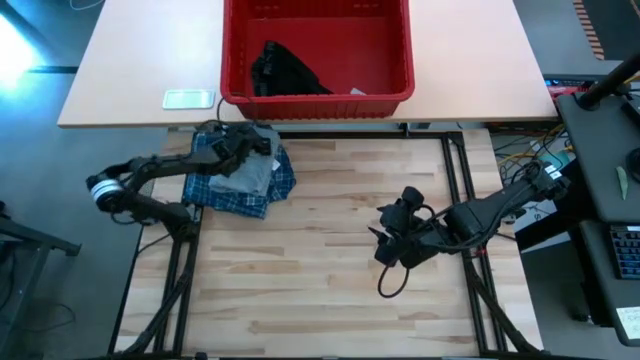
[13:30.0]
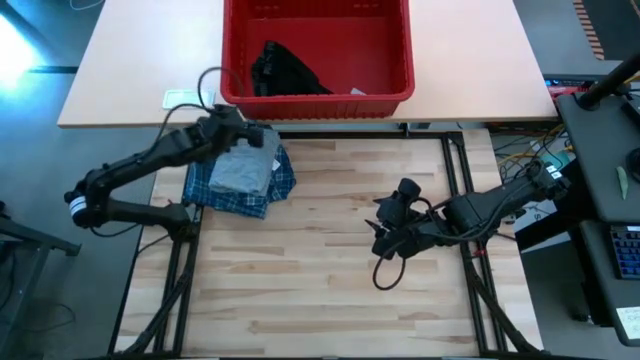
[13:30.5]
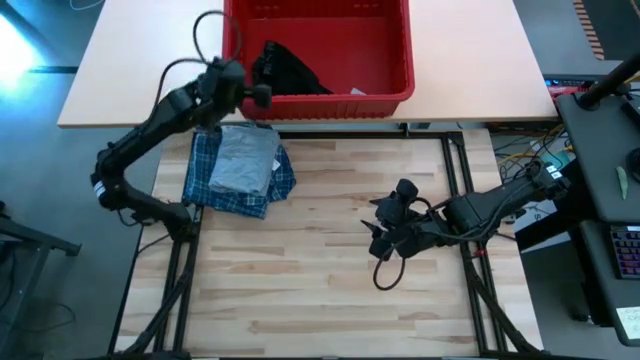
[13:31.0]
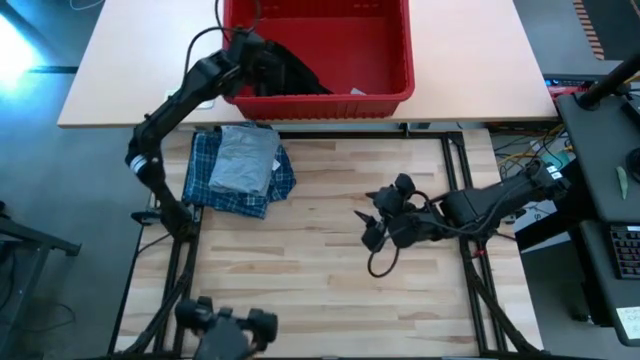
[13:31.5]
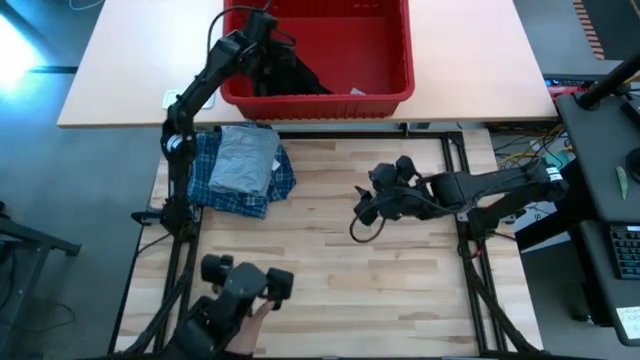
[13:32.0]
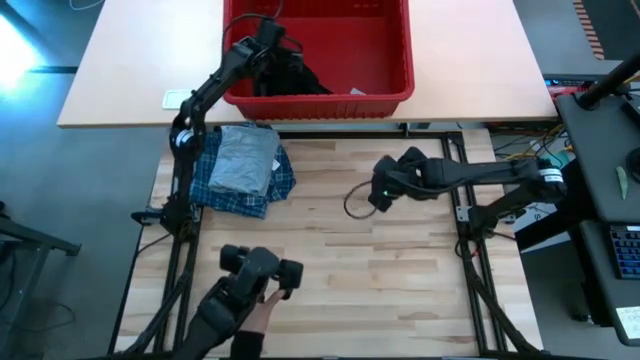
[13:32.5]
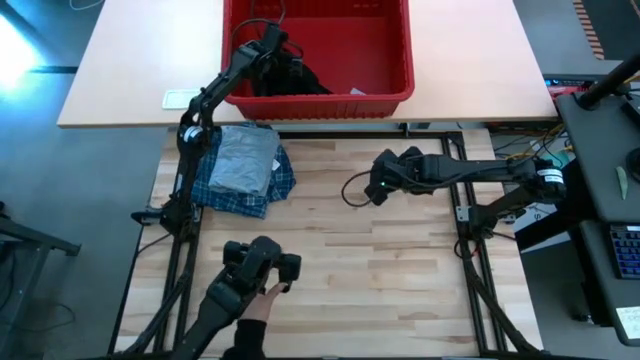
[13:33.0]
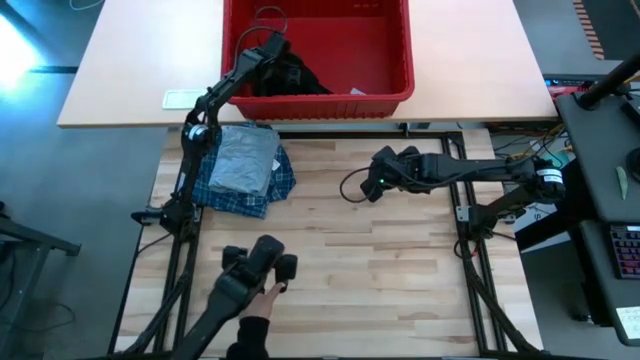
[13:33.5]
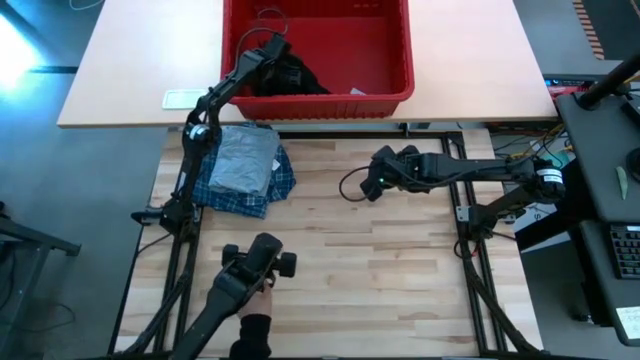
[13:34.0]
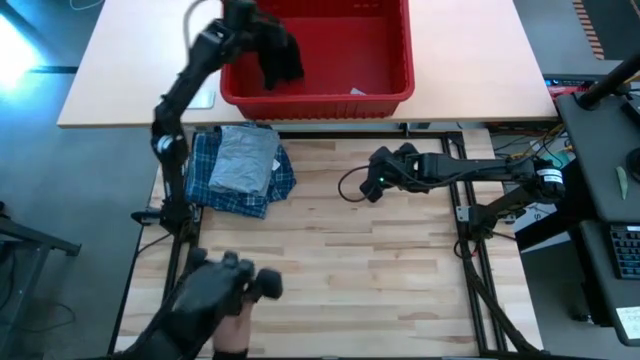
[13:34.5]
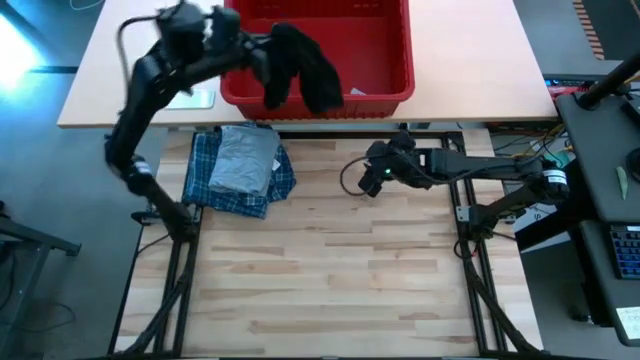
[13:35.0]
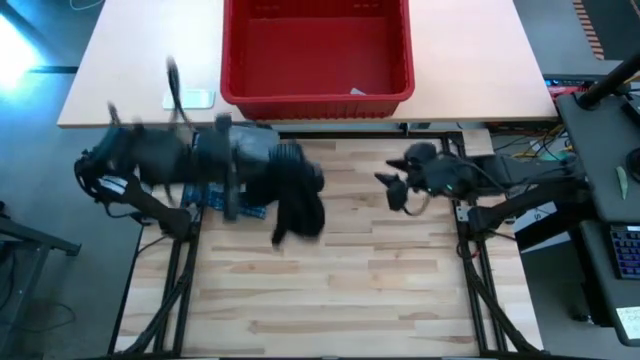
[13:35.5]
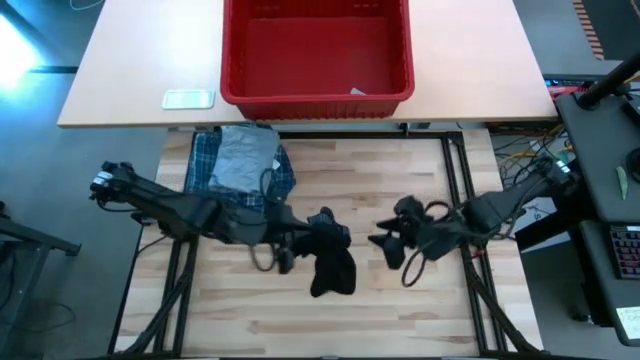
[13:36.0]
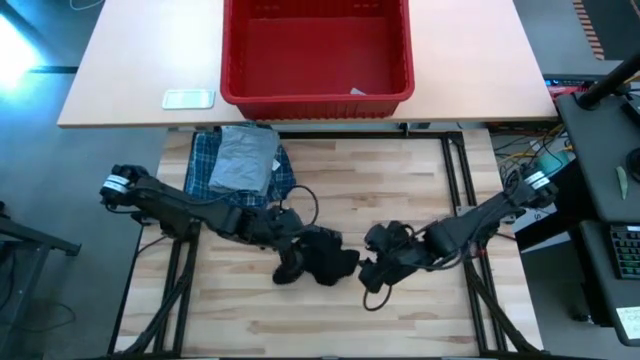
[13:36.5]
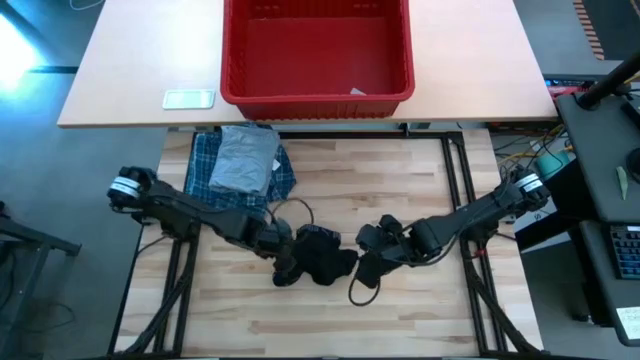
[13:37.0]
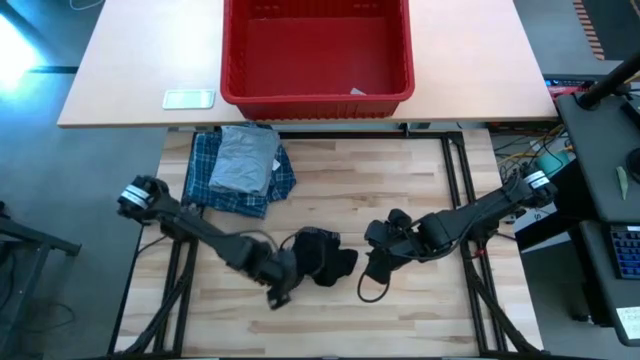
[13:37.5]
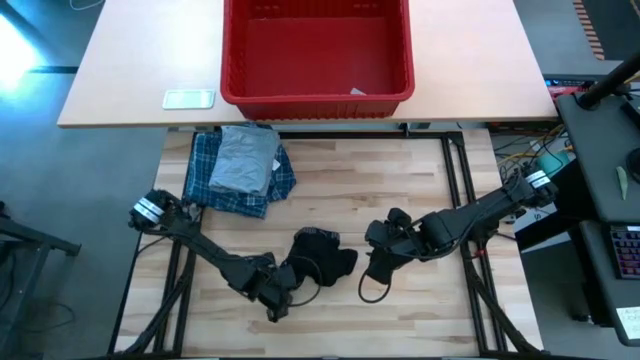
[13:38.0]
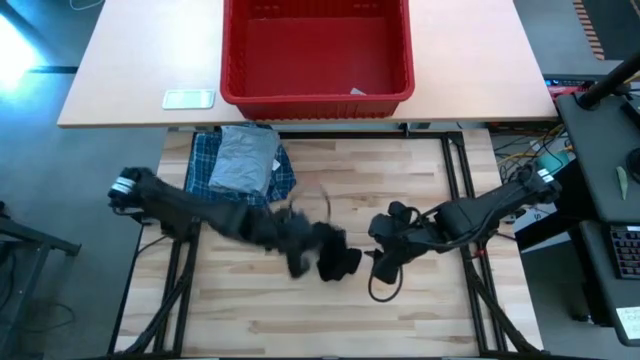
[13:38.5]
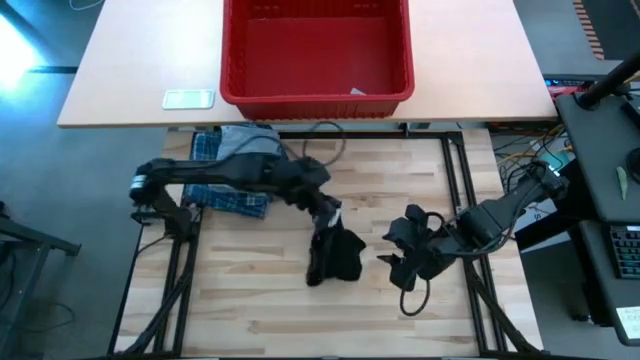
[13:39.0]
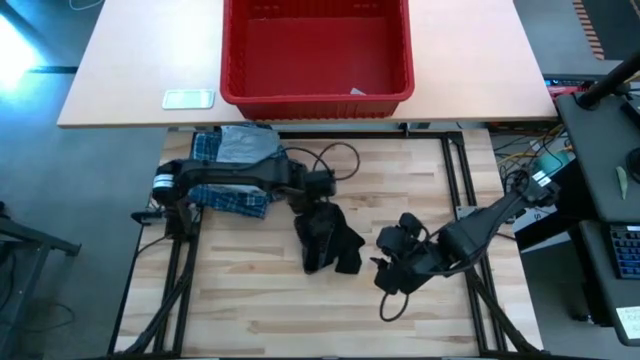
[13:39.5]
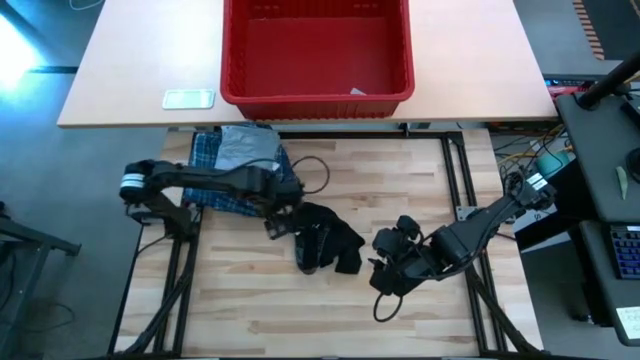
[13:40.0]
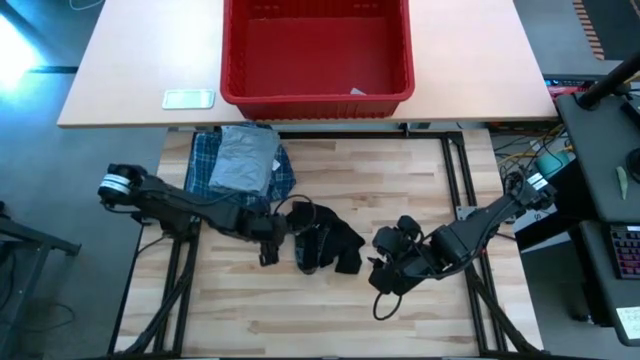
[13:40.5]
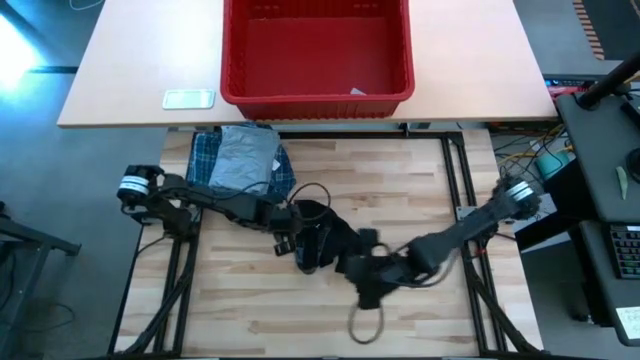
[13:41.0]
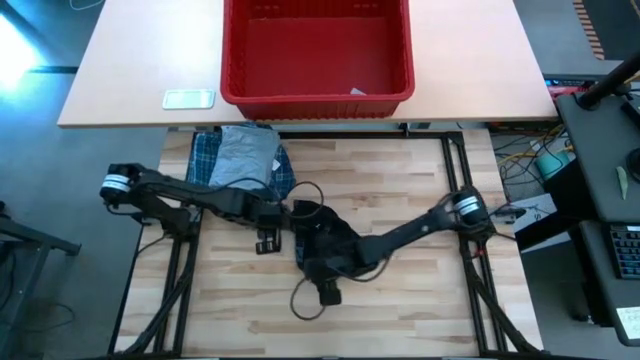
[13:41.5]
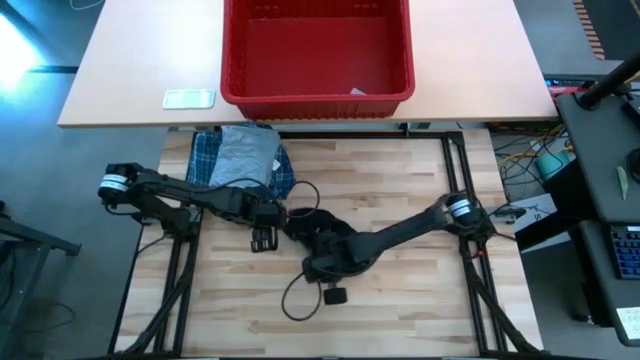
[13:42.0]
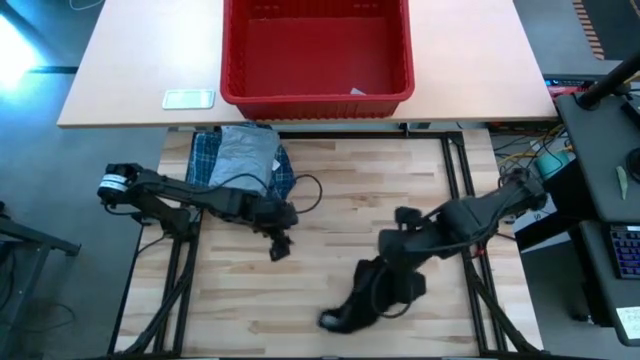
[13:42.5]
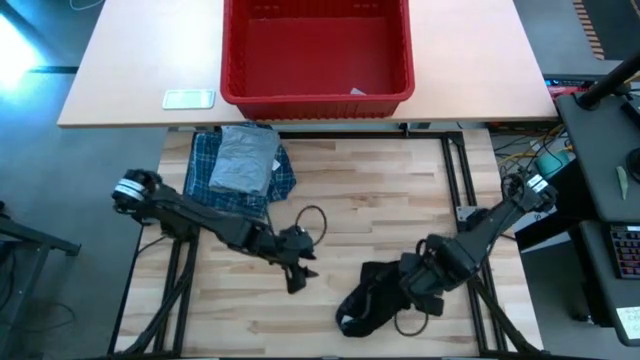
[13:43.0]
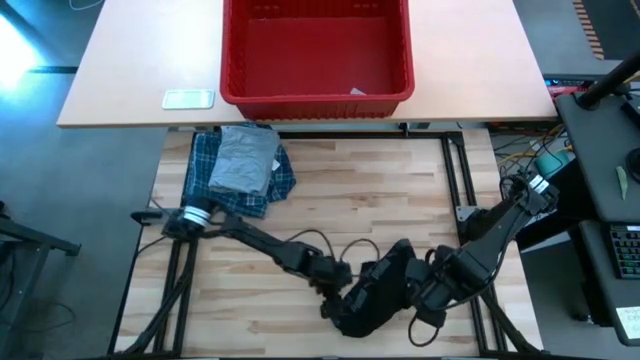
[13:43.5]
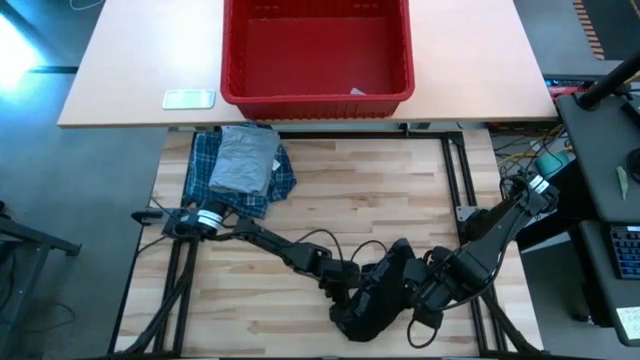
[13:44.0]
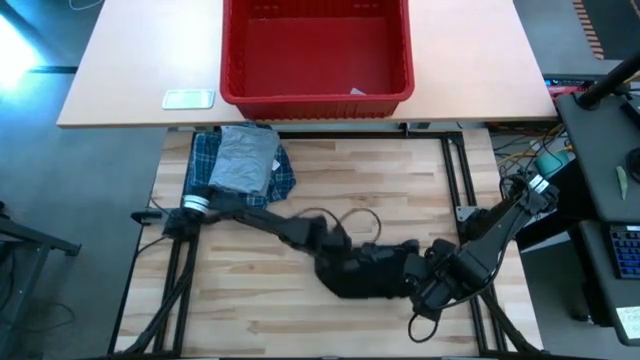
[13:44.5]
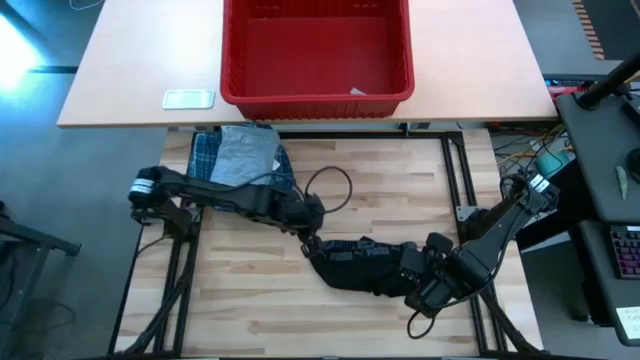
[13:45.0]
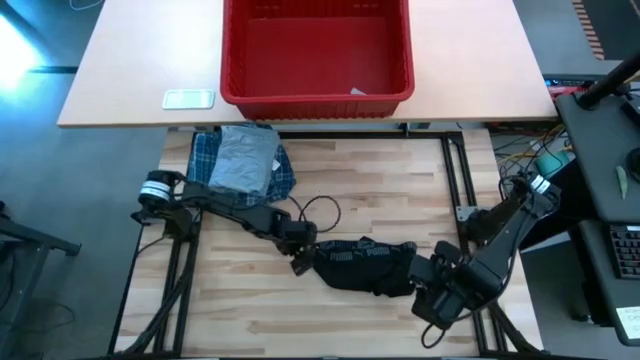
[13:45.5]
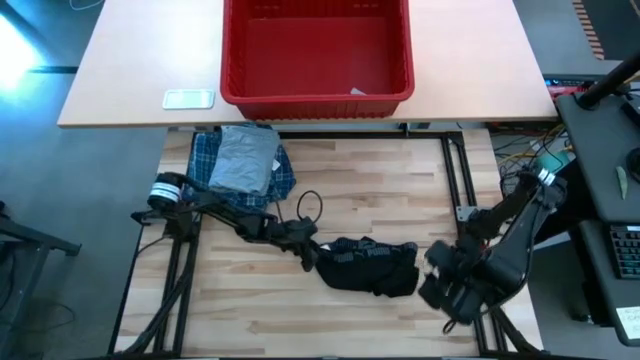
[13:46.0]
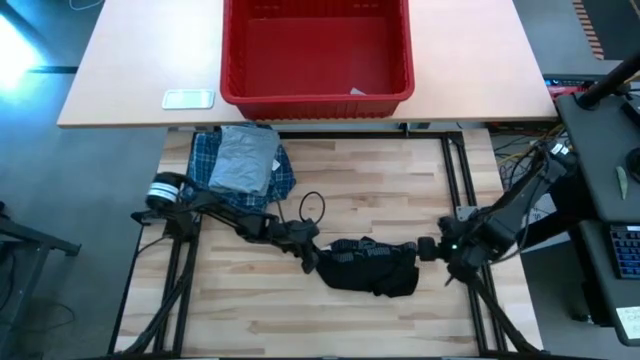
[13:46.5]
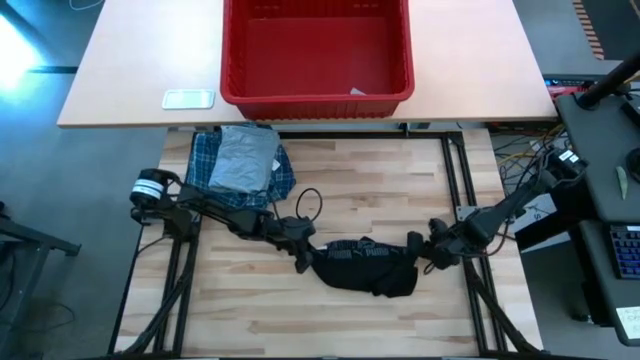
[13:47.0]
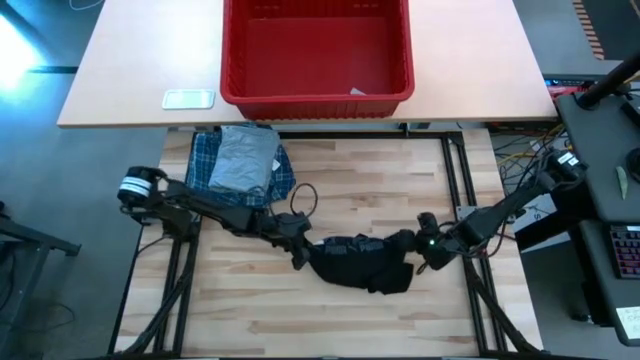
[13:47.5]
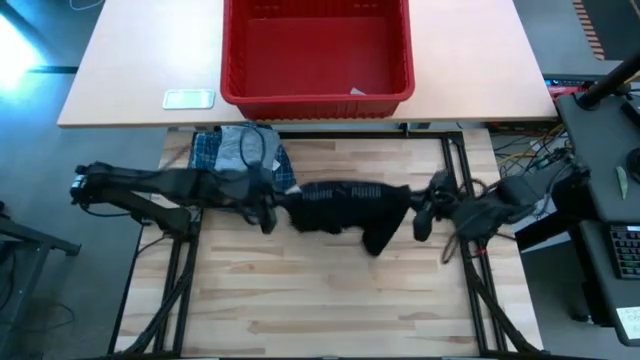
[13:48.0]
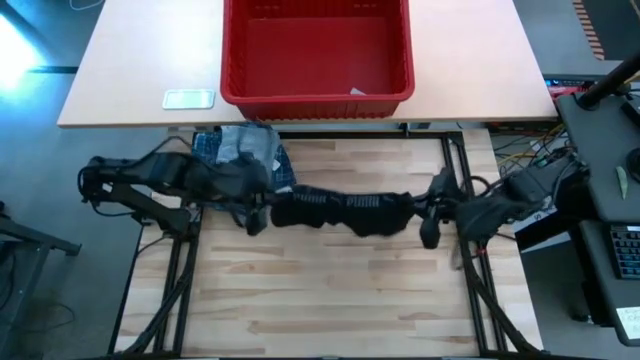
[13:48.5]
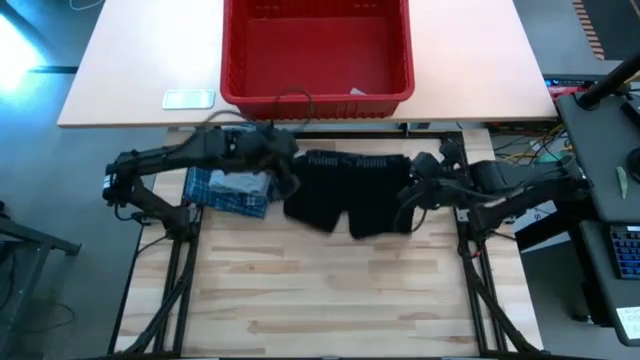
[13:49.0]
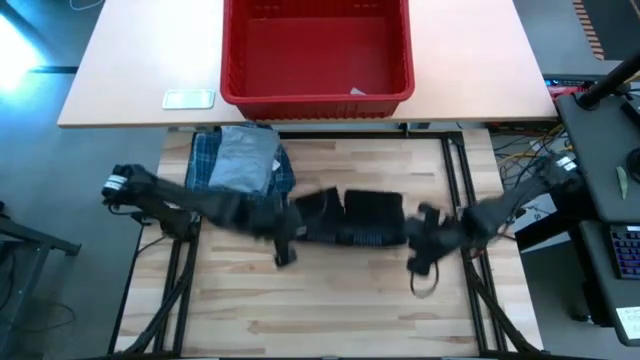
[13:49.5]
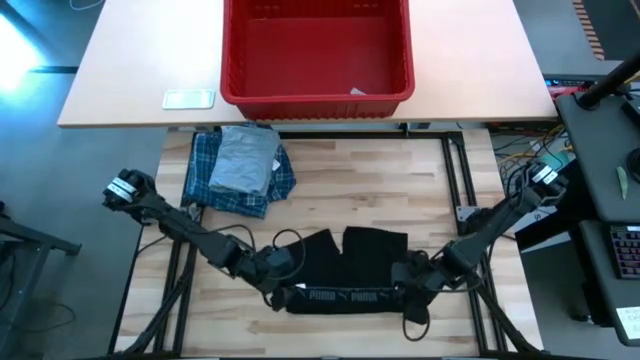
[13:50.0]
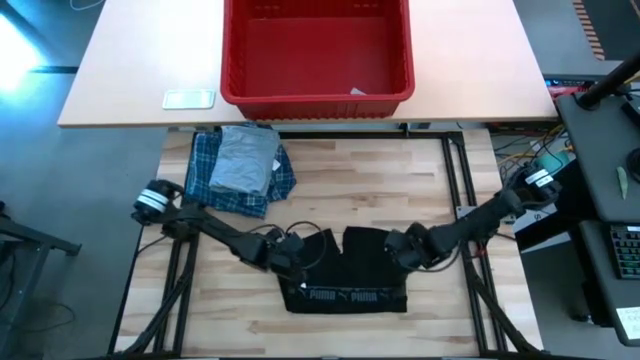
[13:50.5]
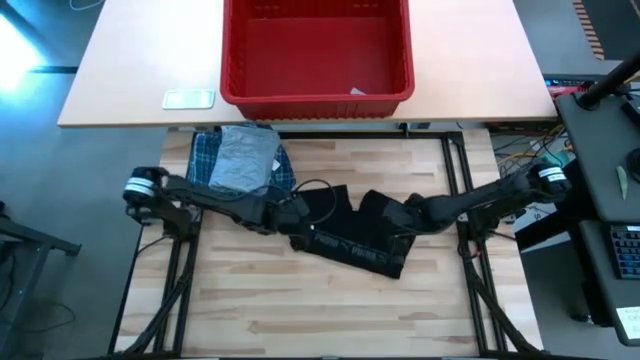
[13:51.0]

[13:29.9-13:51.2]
Task: Fold Laundry from Bin
Fold the black underwear
